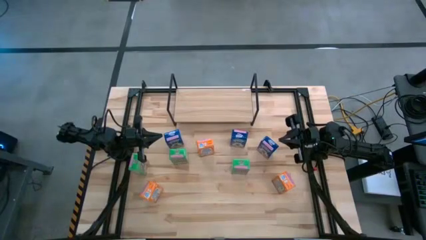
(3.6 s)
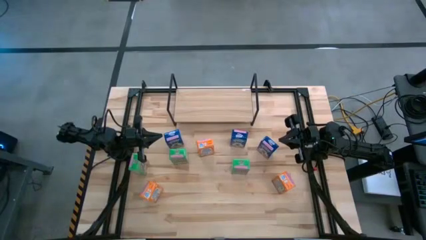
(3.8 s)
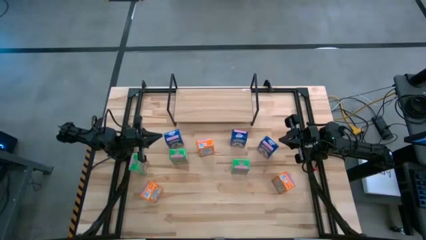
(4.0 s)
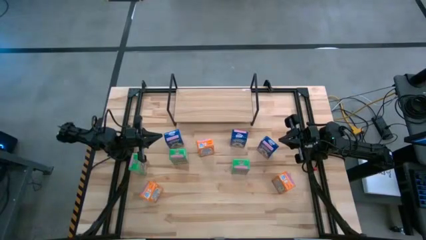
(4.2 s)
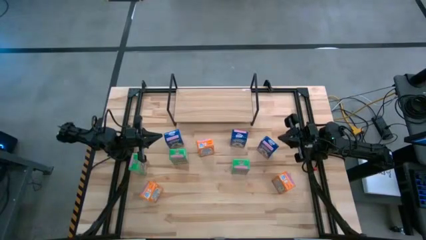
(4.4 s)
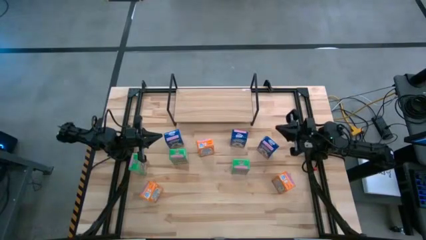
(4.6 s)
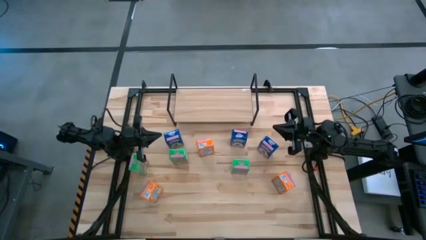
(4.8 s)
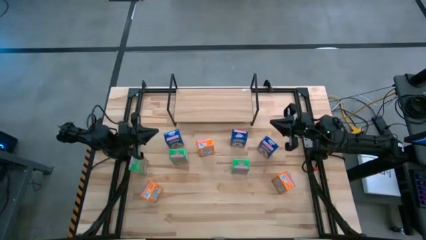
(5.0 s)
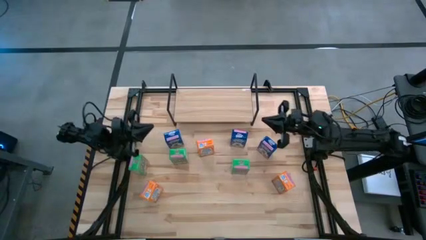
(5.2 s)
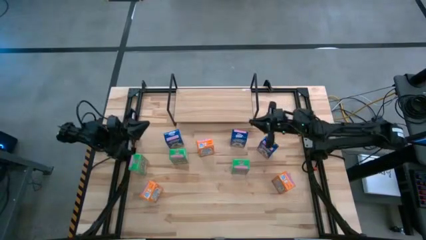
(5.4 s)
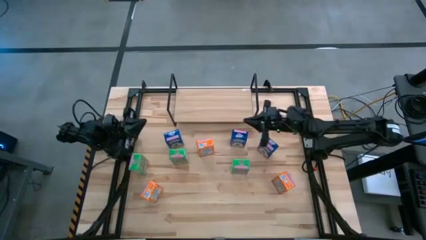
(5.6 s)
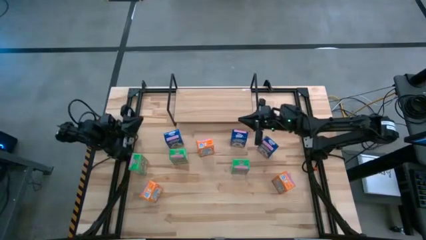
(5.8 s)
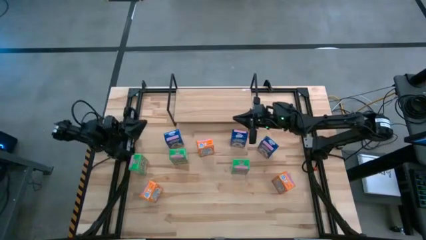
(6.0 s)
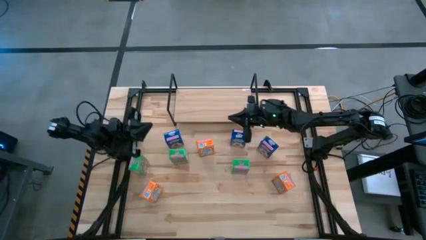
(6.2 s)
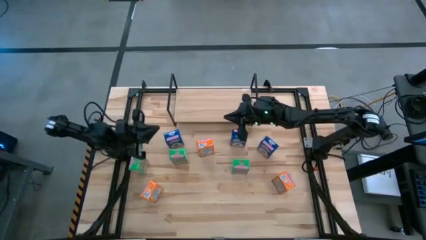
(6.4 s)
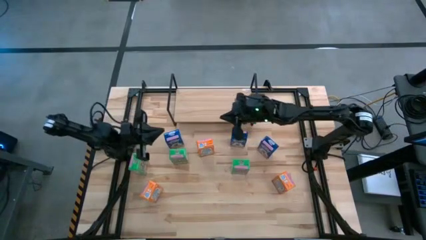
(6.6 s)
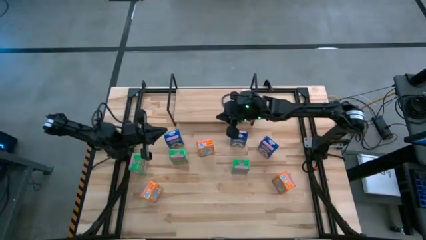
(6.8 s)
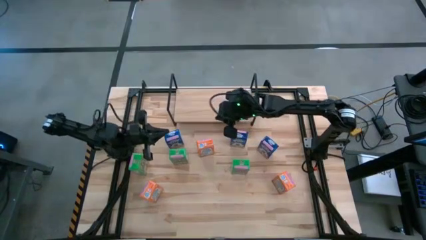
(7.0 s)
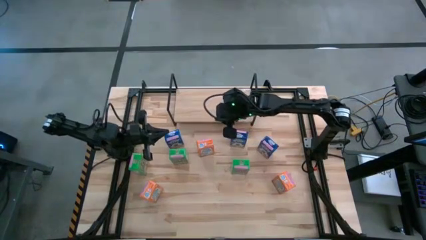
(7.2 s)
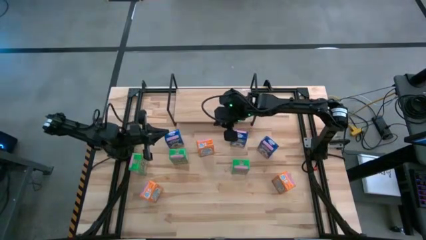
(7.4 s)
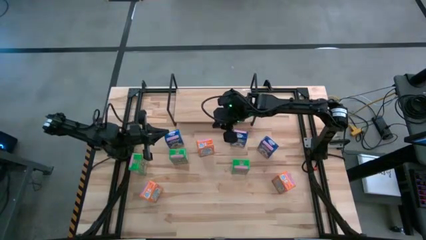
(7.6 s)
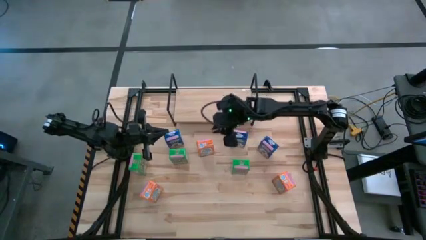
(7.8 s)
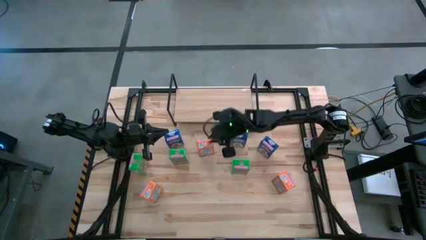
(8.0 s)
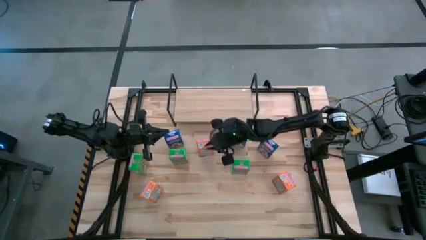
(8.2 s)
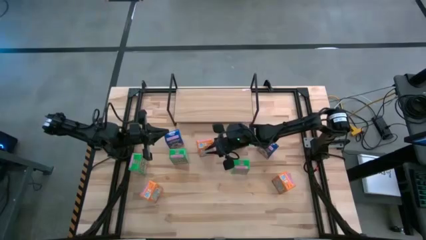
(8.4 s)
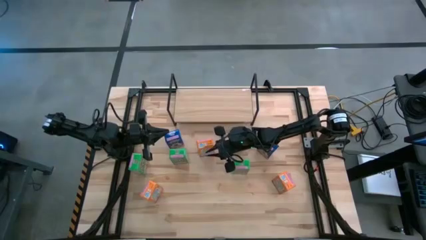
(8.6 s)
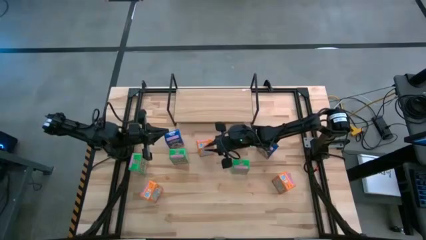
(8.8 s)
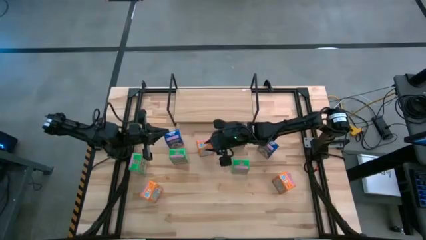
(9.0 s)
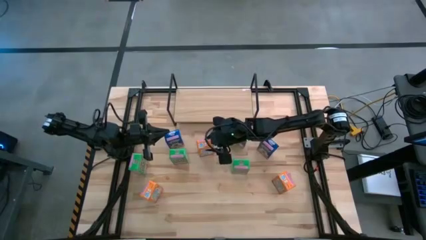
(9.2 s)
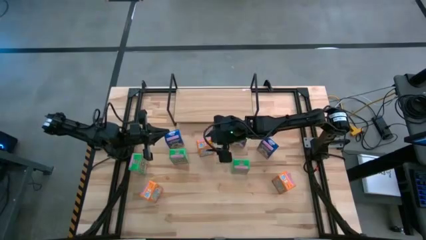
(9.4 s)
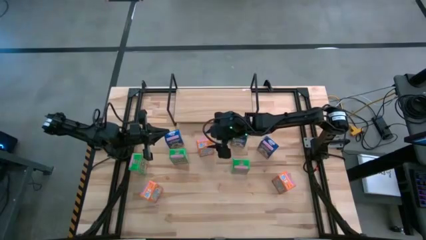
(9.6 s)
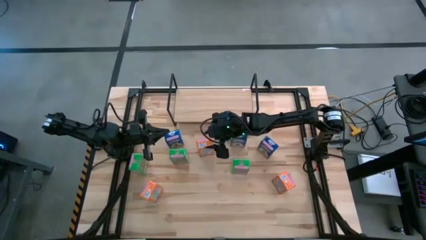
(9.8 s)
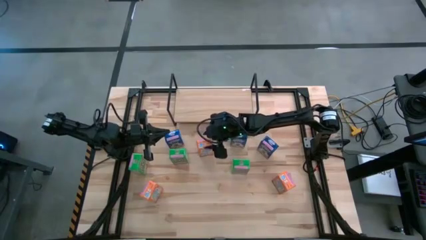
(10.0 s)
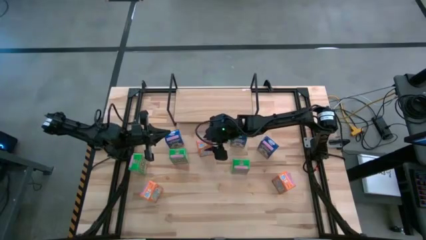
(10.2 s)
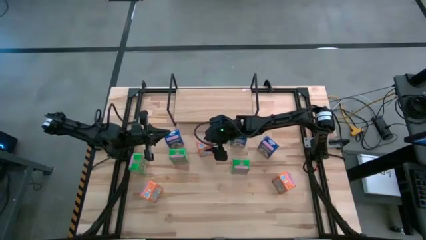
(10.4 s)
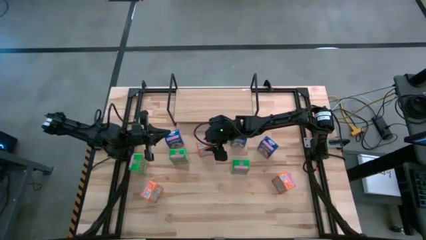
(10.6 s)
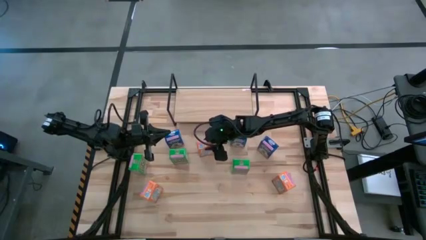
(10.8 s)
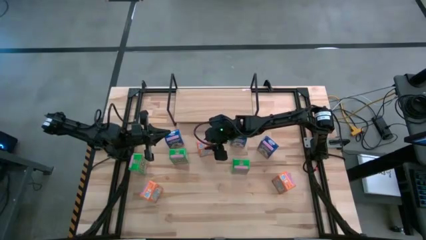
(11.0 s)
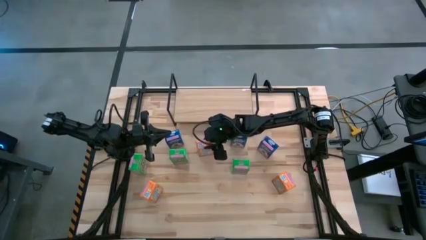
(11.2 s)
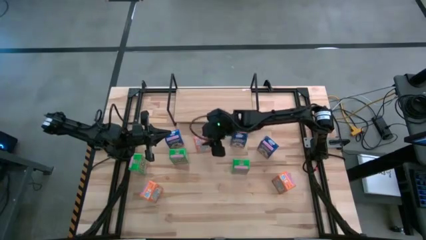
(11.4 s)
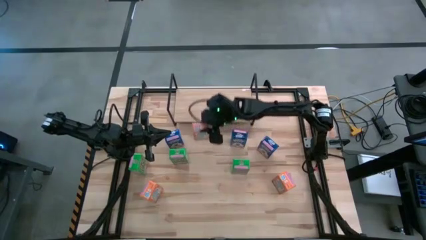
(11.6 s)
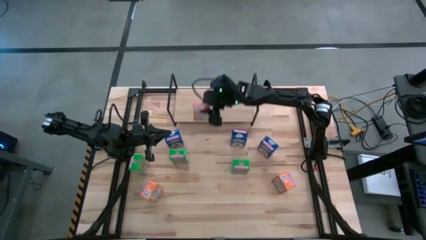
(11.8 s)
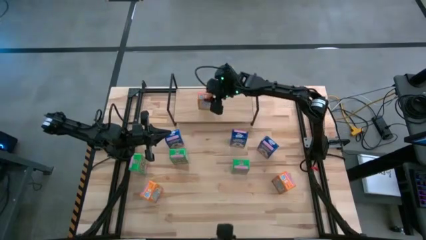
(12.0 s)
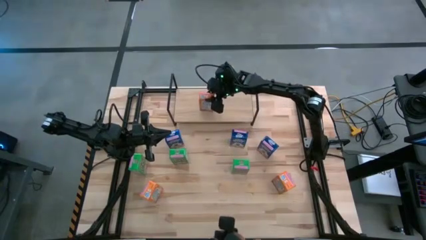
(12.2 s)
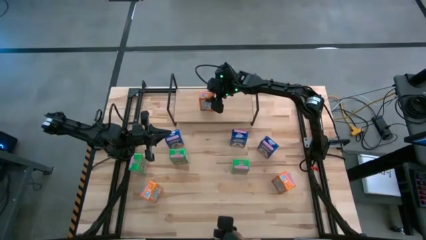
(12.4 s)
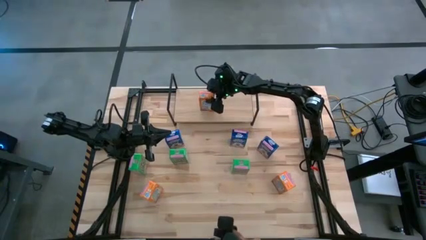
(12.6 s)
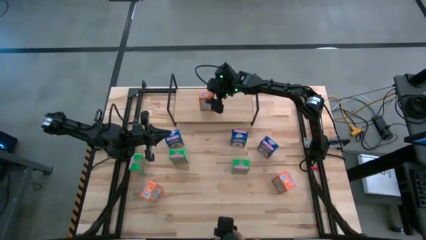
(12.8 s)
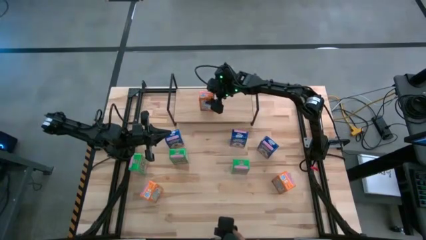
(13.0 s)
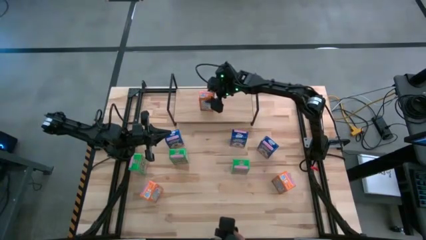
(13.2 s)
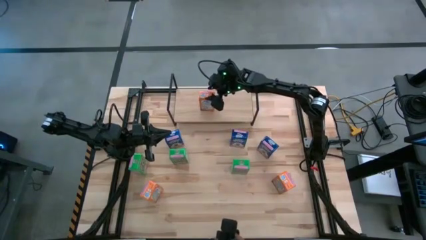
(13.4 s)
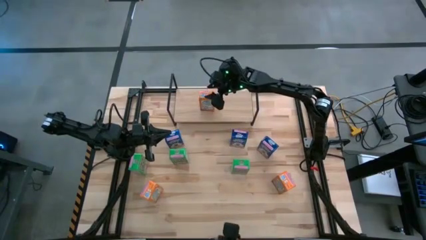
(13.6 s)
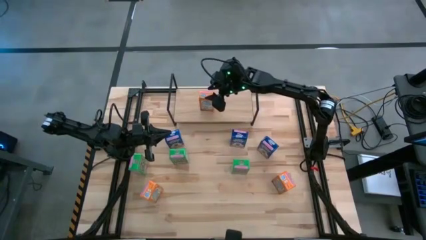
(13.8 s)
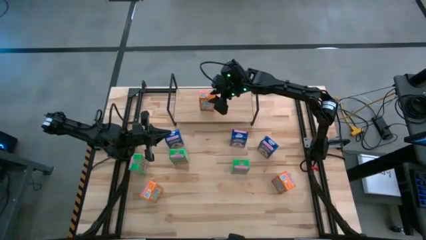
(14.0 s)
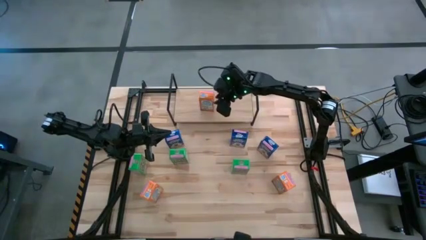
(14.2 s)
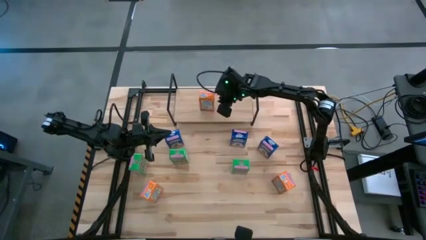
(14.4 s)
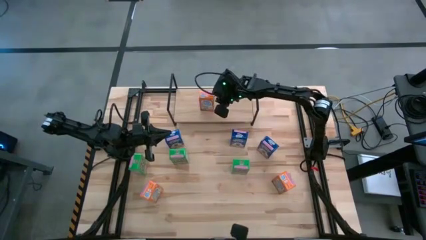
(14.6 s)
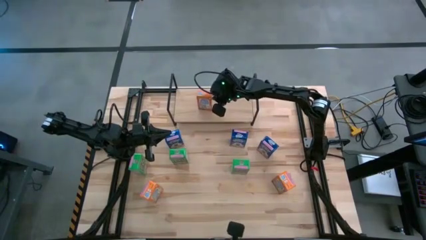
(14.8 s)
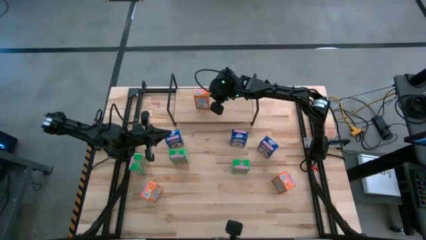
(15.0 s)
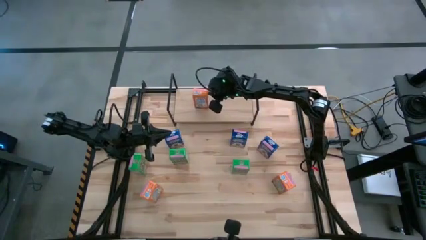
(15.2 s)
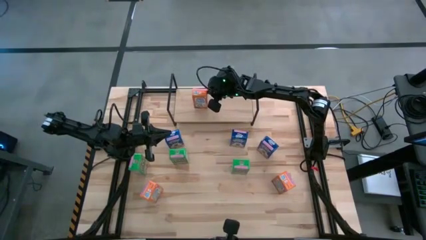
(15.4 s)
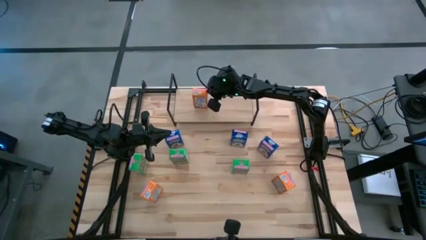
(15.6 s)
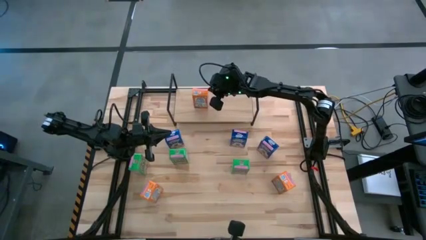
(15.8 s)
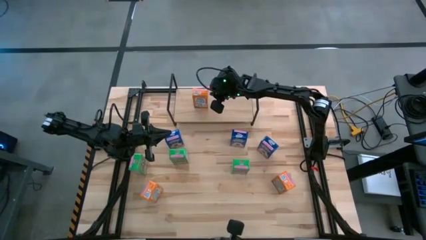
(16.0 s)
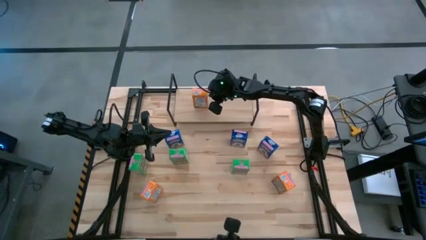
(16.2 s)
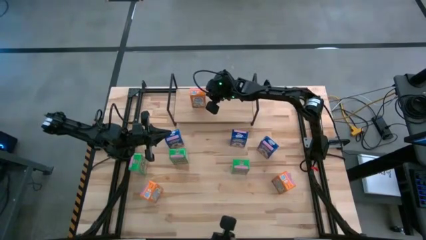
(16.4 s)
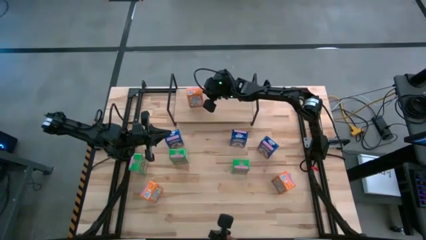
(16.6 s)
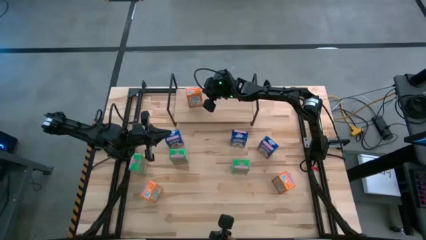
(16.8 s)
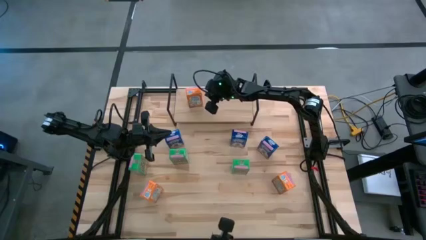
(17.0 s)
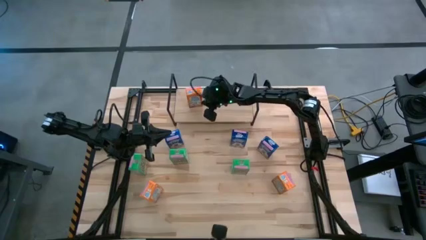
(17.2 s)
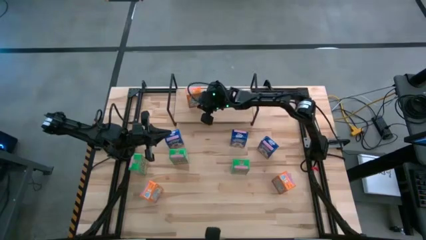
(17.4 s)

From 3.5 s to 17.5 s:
Task: Stack cereal on shelf
Put the center orange cereal box on the shelf

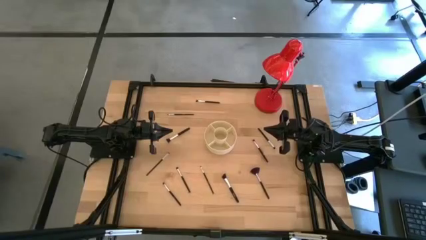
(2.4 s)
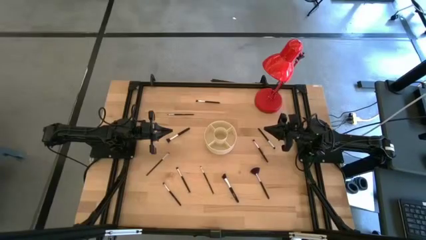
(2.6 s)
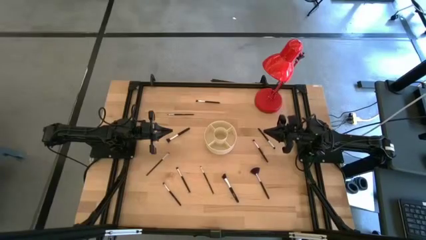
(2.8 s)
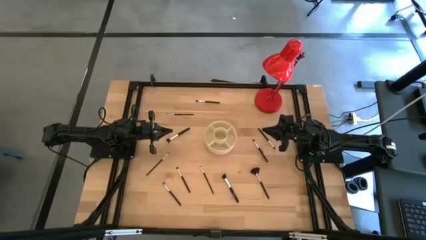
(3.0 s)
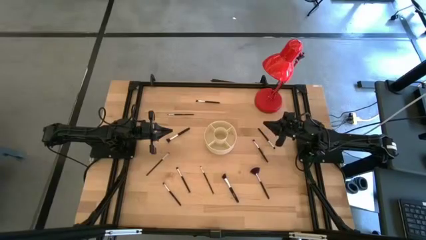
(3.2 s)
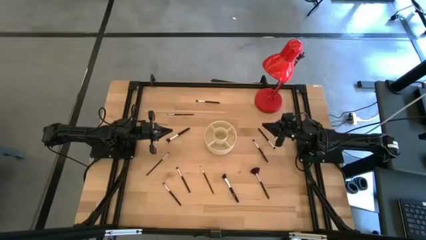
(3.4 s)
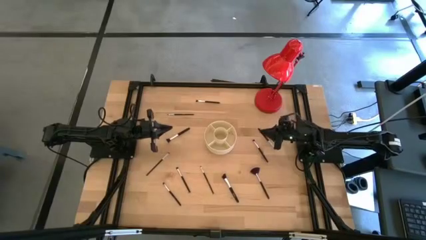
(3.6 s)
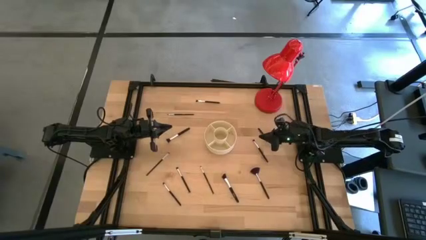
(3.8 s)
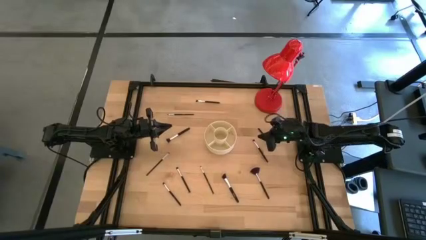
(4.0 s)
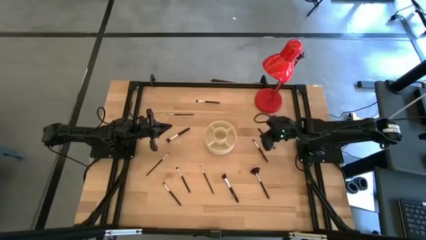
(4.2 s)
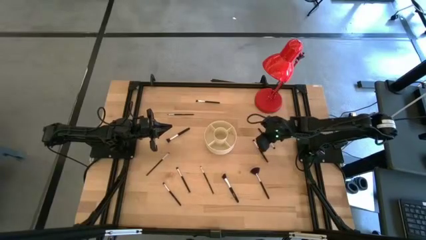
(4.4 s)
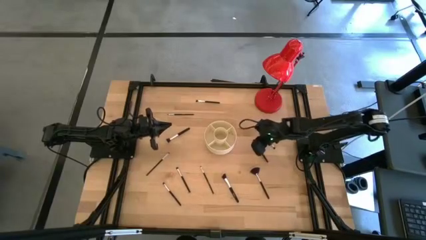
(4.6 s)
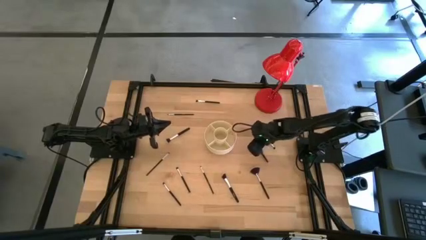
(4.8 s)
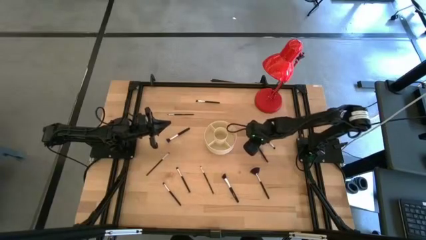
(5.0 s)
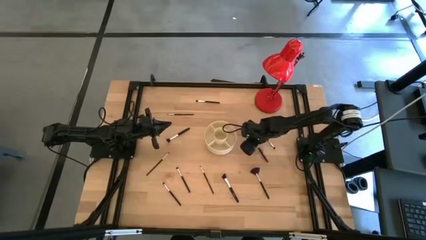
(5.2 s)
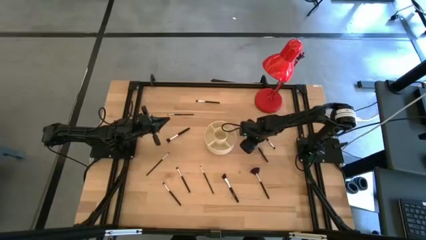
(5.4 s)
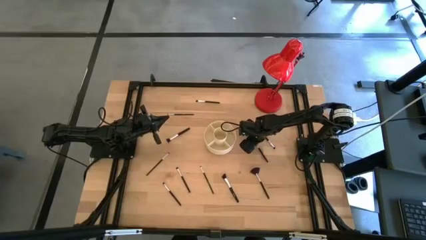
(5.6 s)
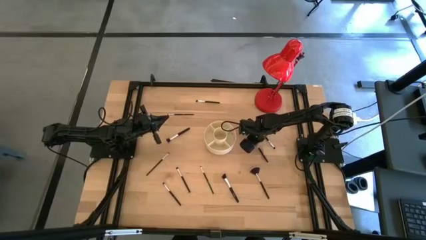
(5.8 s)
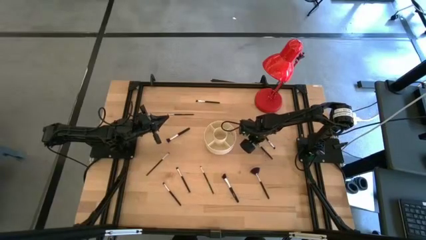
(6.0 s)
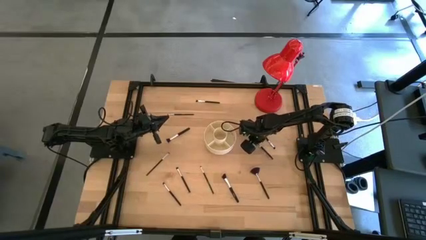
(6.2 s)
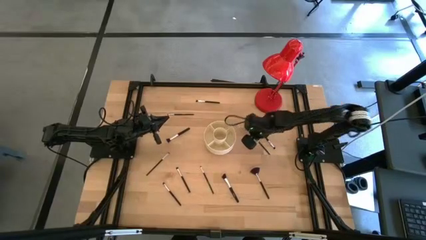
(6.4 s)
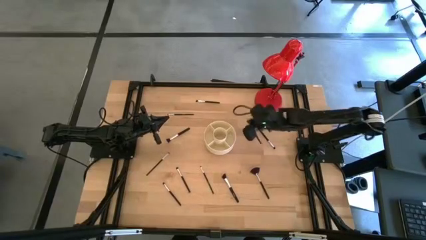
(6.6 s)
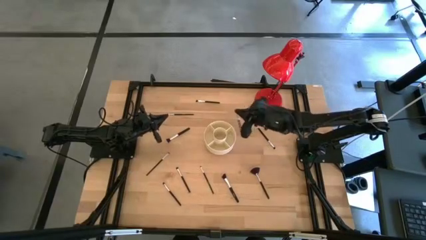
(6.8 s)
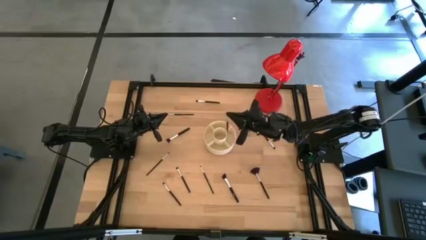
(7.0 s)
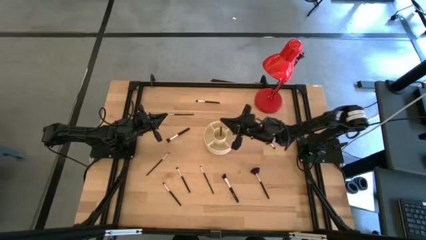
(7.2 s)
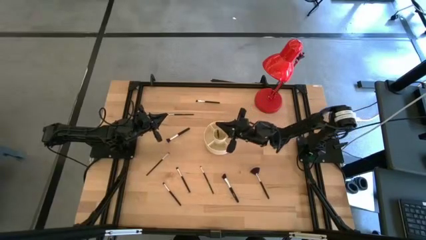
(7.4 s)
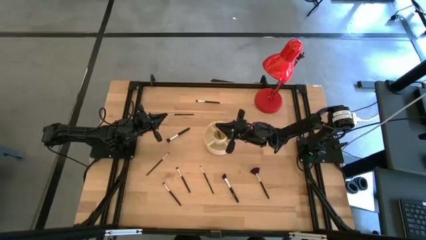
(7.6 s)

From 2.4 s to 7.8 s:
Task: Put items in baskets/containers
Put the eyeshadow brush into the brush organizer
